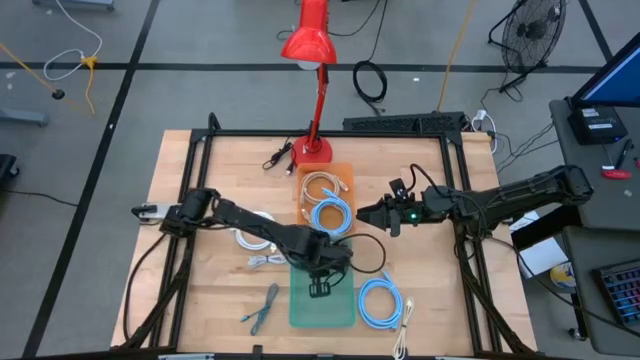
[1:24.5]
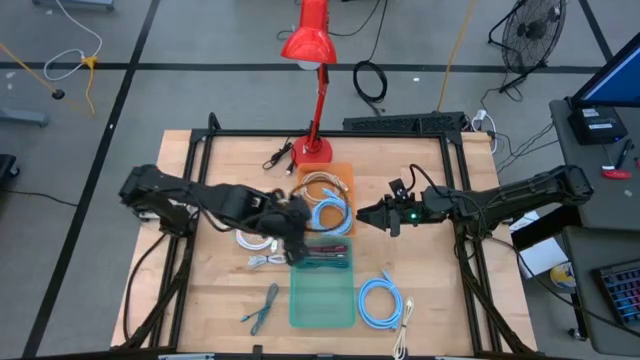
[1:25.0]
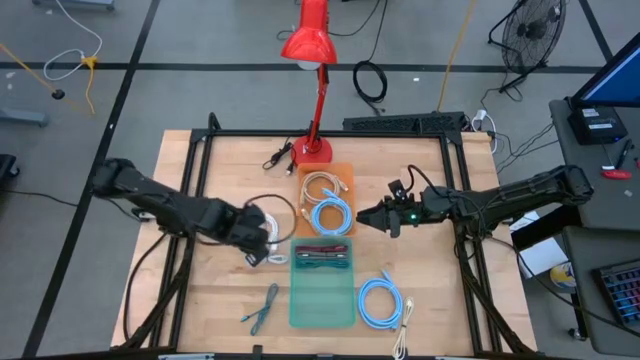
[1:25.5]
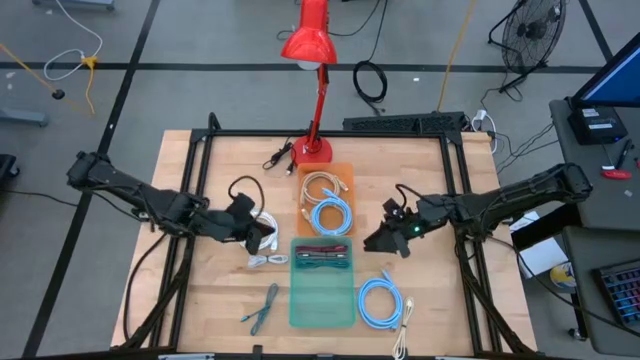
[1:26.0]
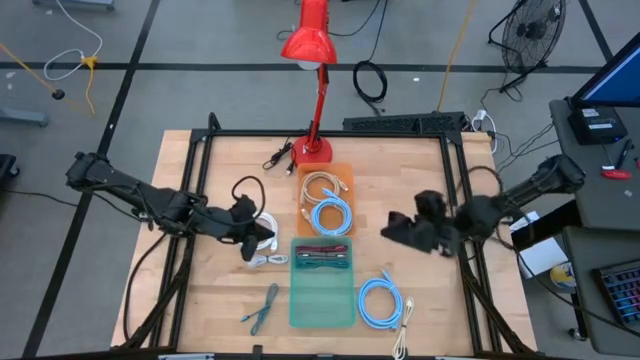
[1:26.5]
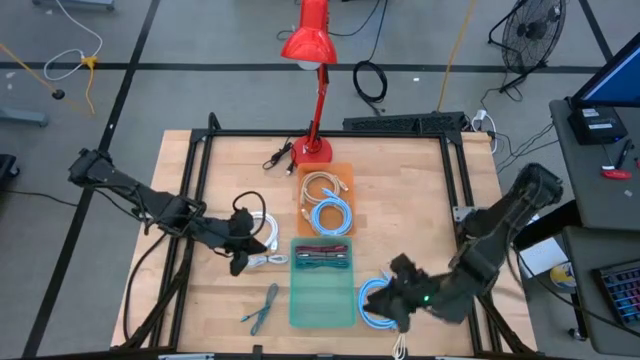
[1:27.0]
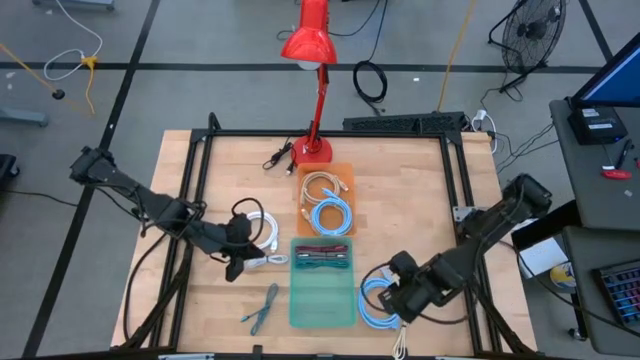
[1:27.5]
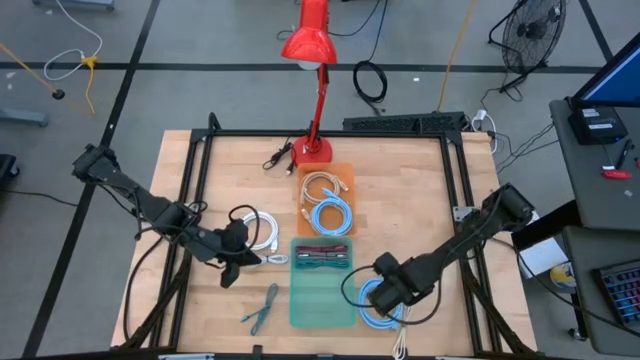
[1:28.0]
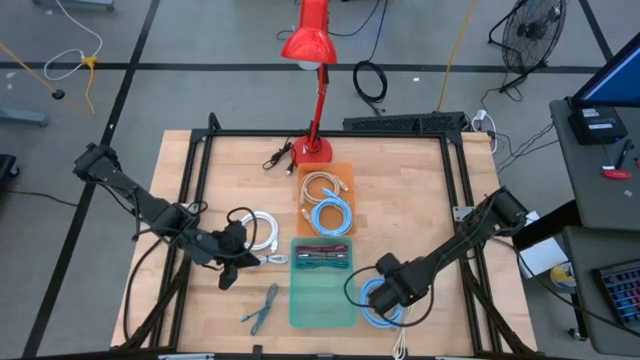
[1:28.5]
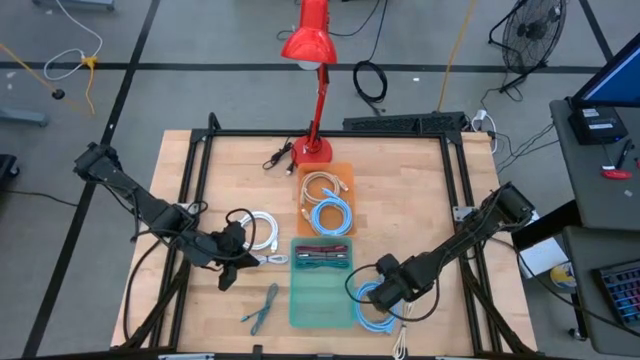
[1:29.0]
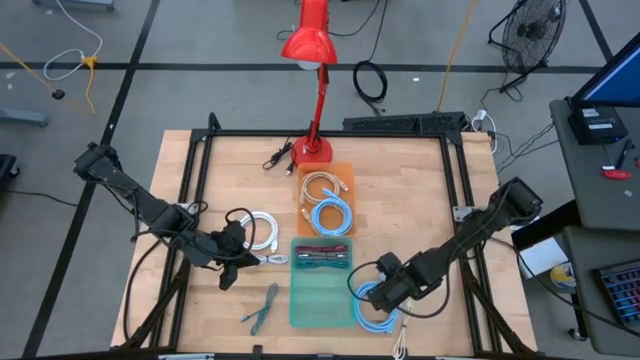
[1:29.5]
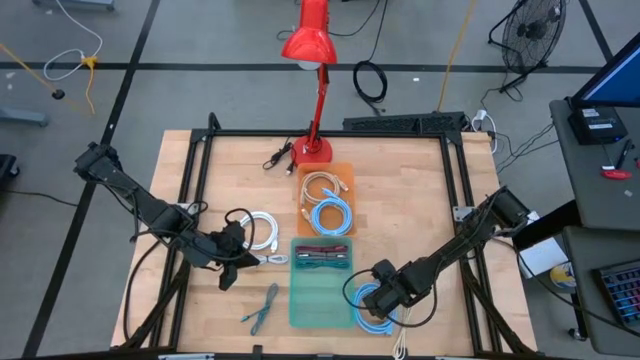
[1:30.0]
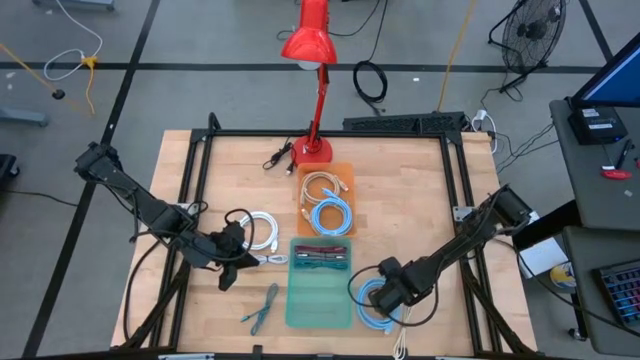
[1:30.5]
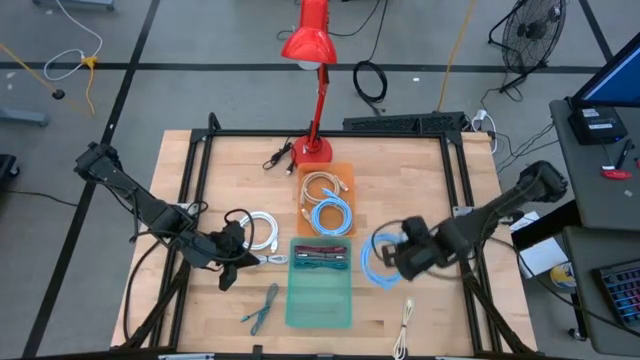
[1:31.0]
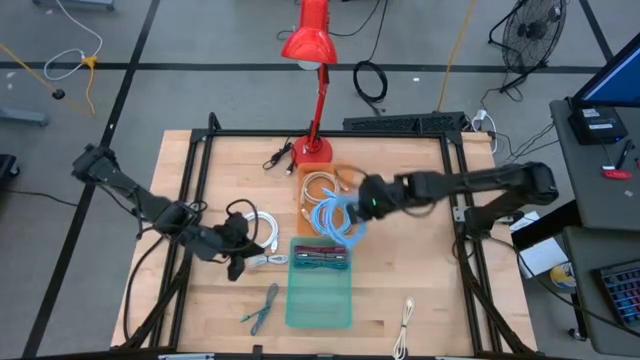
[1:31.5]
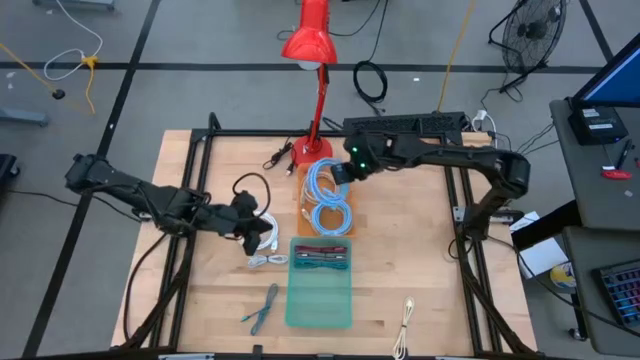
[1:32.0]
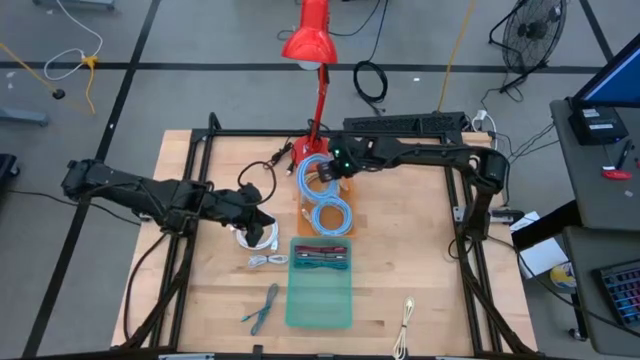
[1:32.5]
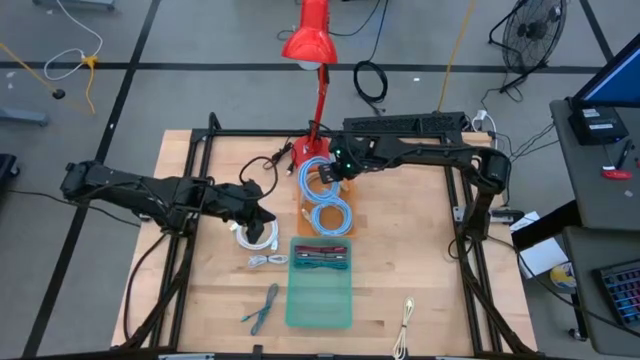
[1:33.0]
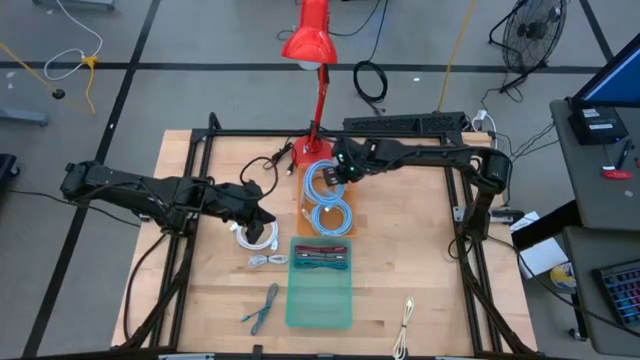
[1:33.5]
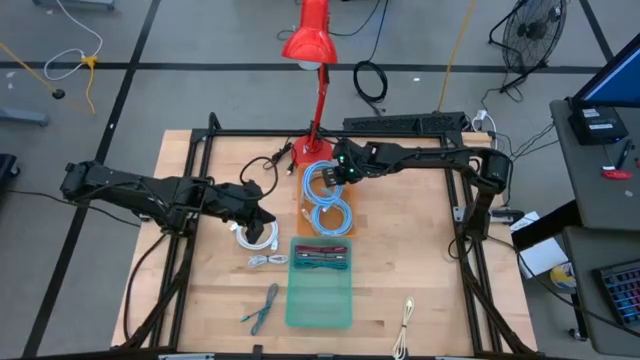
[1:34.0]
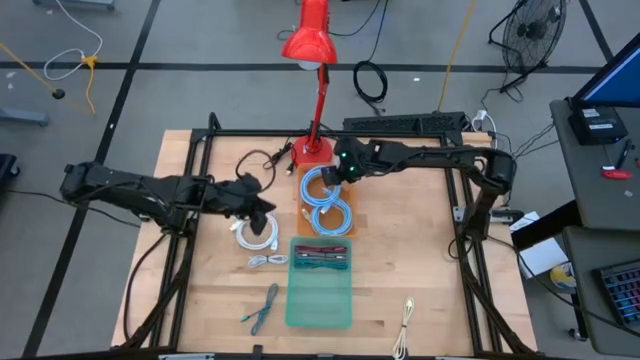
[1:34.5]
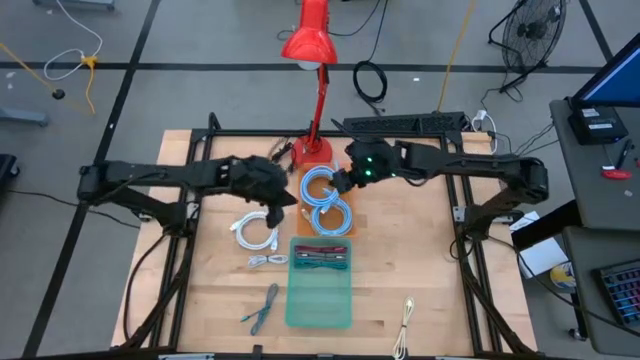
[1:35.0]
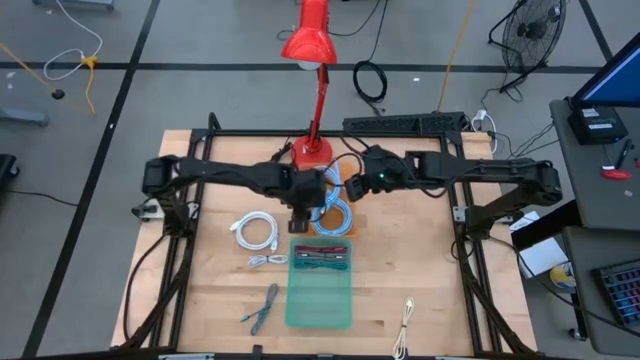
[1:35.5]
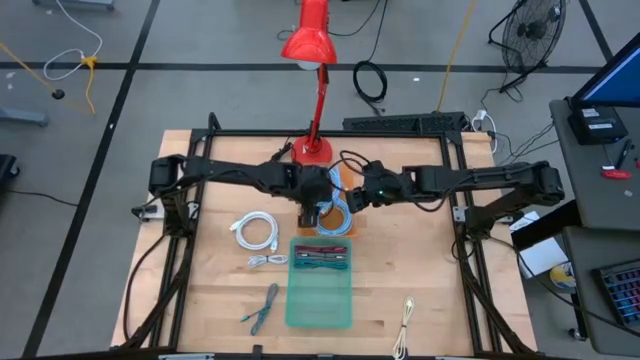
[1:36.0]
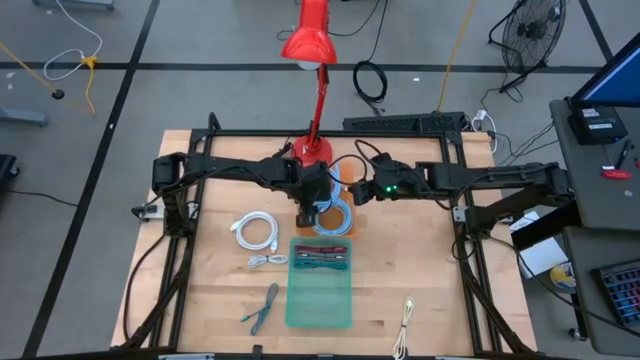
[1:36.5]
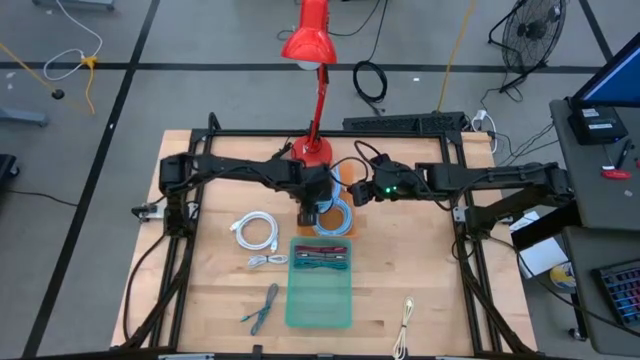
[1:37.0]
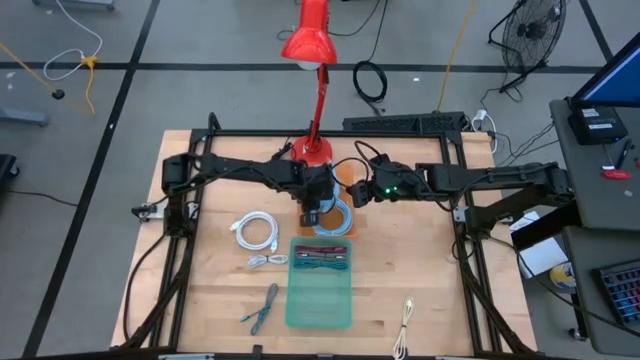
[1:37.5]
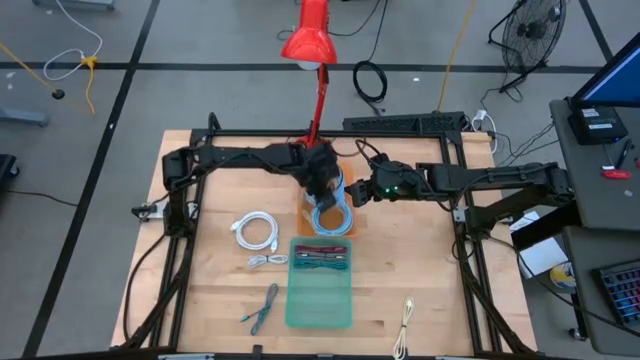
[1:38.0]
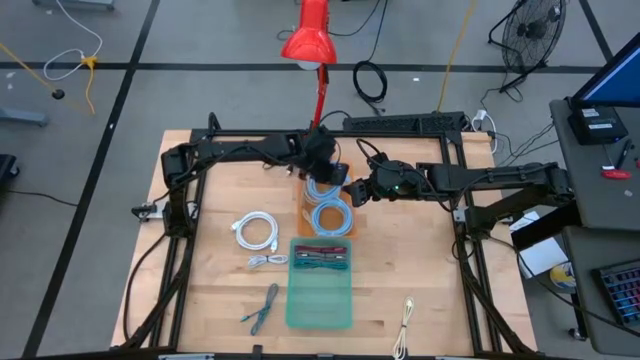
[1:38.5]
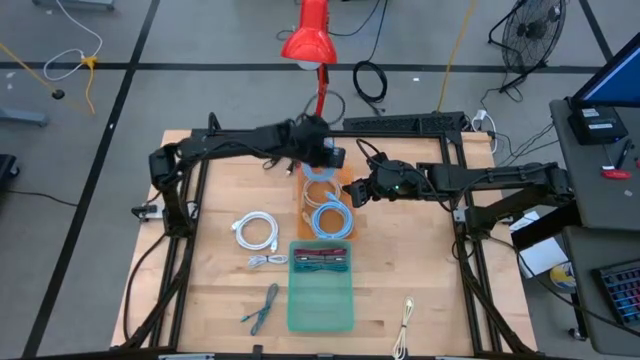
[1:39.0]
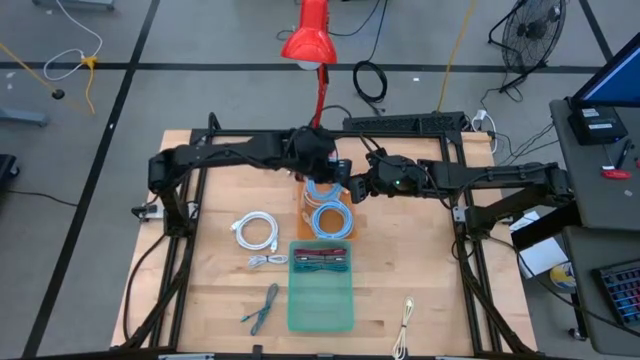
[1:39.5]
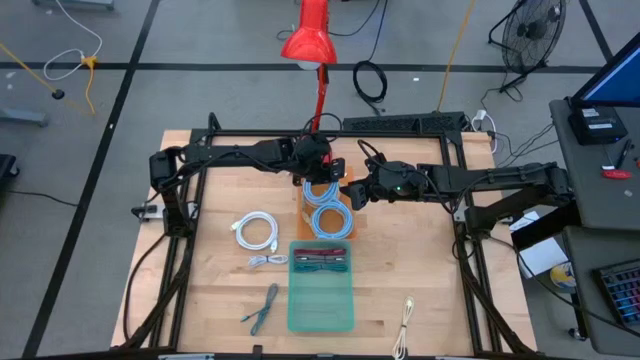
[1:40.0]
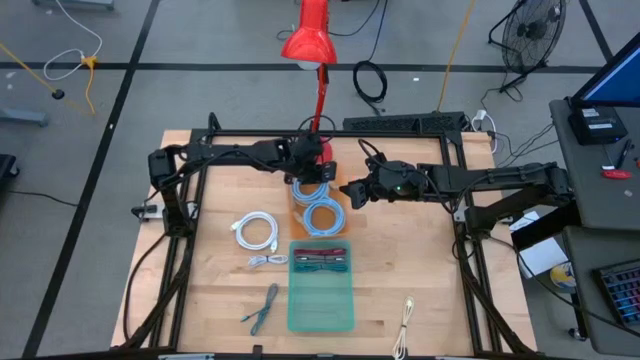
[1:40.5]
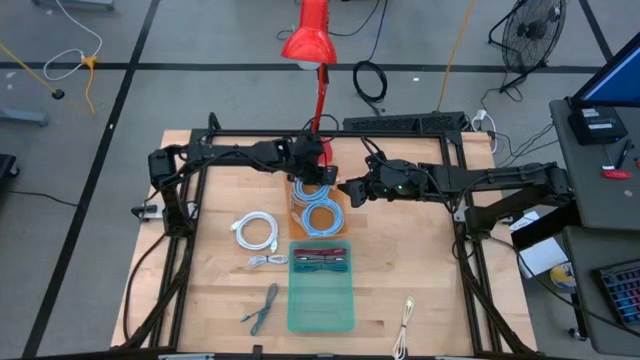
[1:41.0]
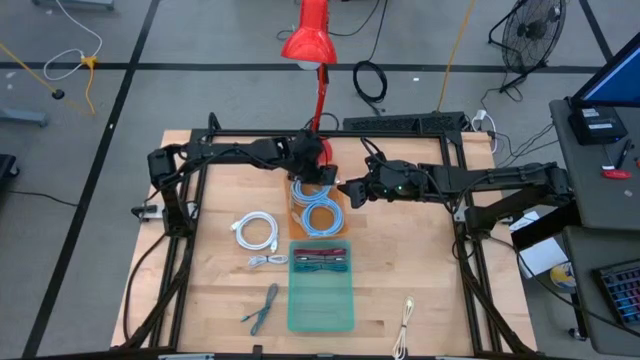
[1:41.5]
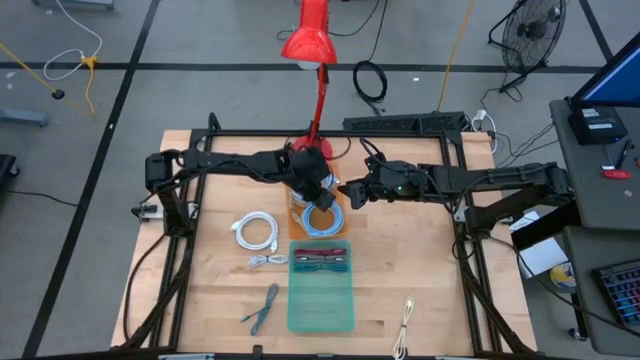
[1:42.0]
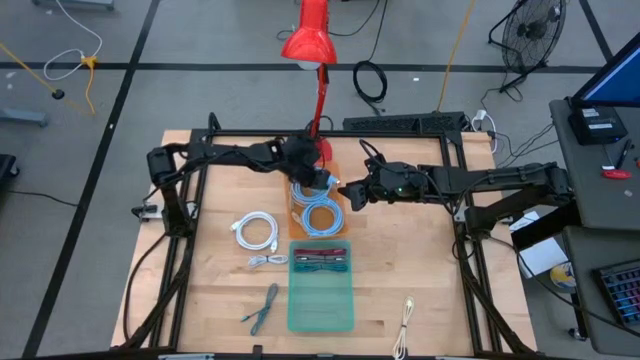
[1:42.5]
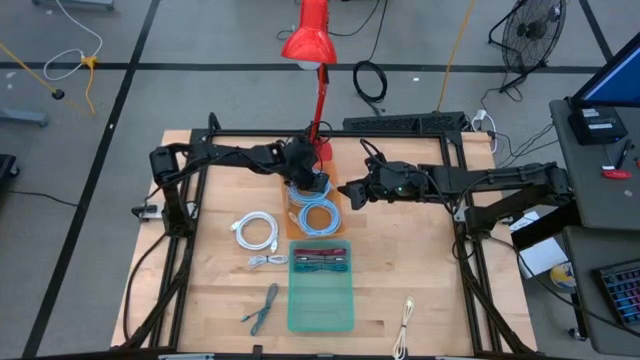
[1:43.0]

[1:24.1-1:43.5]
Task: Sort cables
Put the blue video cable into the orange bin

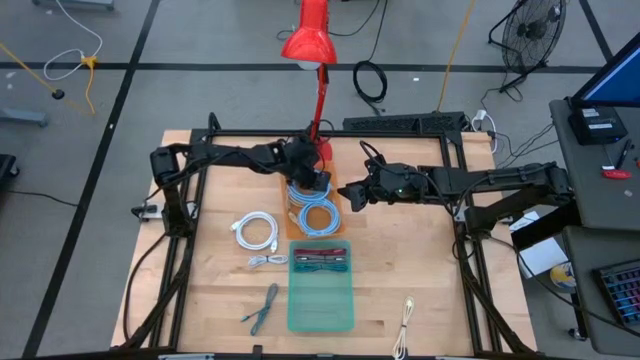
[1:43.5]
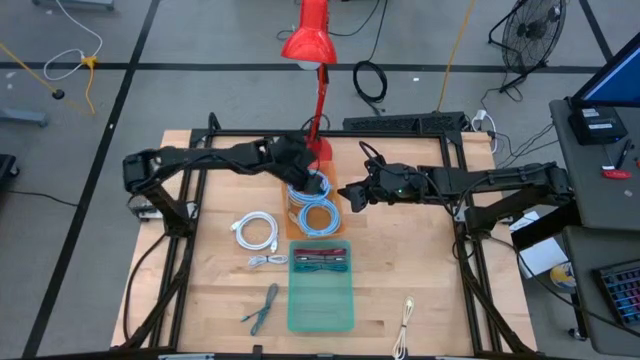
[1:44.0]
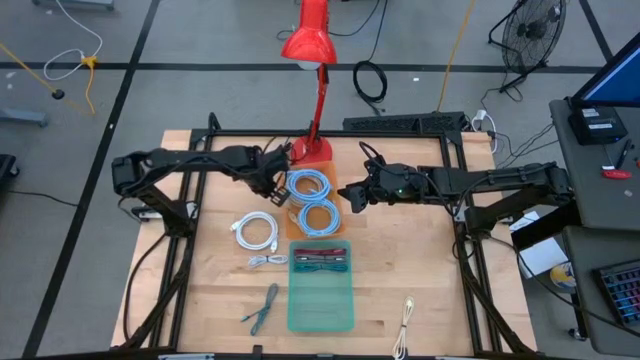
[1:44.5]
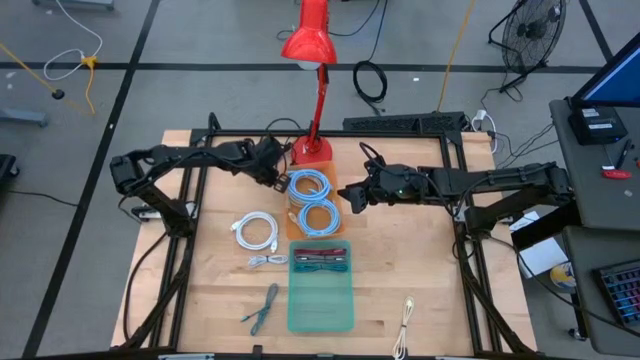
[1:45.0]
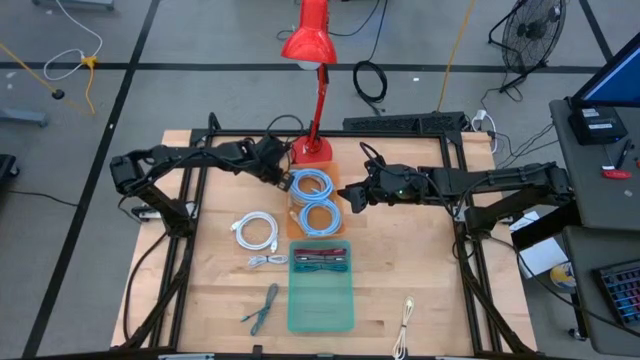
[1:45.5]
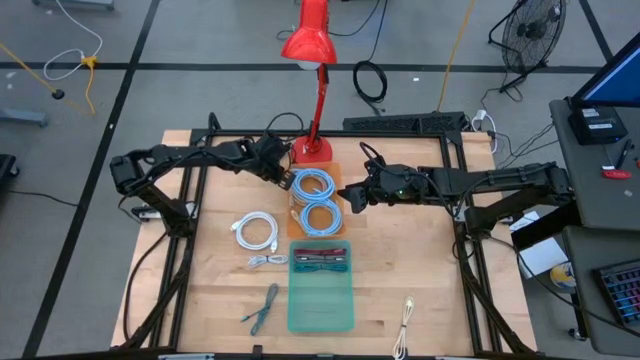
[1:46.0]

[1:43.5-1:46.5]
Adjust the orange bin
